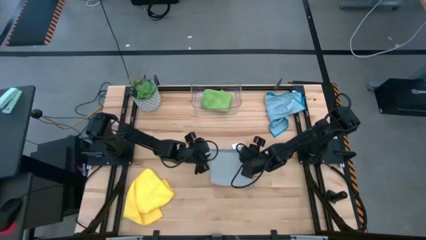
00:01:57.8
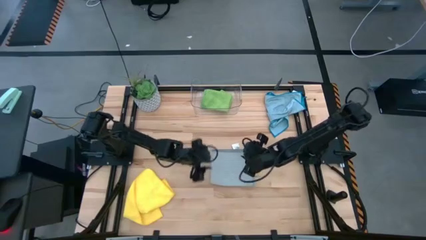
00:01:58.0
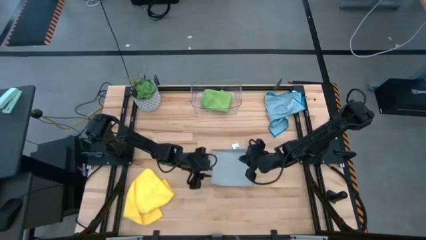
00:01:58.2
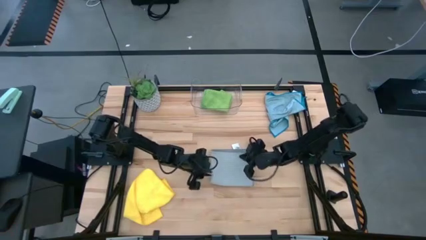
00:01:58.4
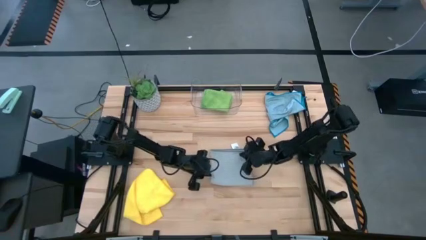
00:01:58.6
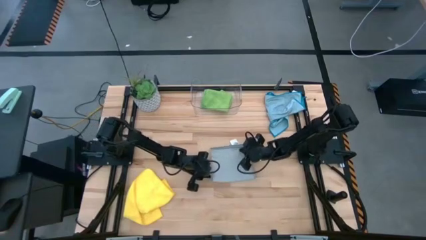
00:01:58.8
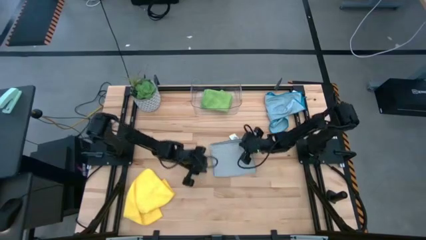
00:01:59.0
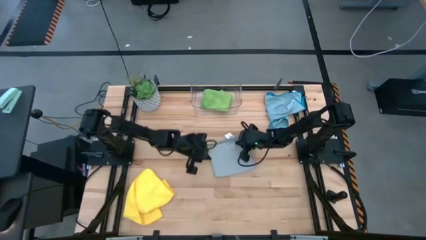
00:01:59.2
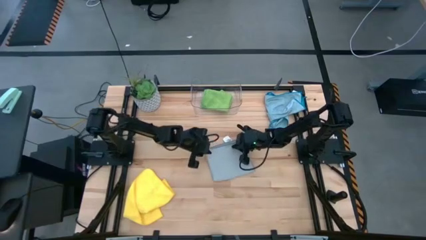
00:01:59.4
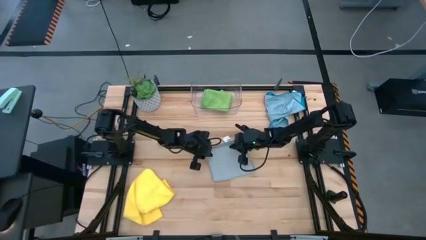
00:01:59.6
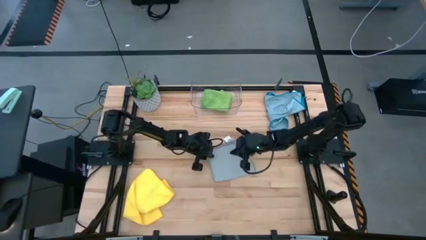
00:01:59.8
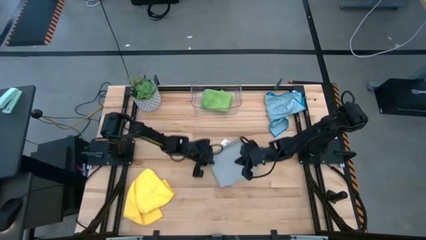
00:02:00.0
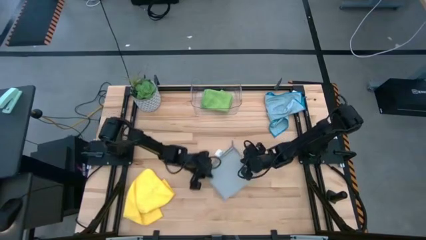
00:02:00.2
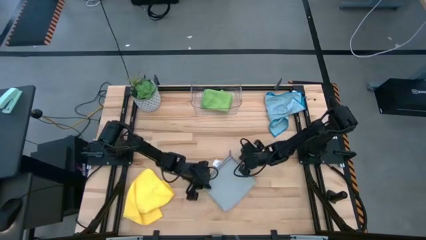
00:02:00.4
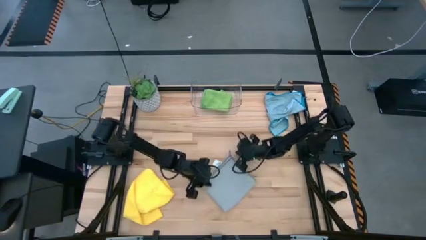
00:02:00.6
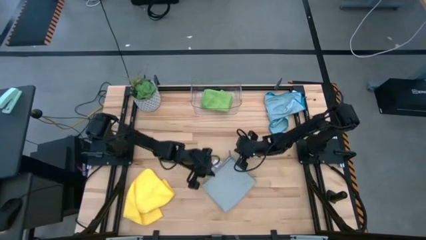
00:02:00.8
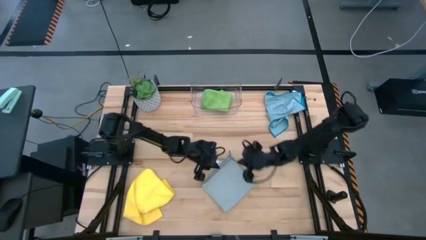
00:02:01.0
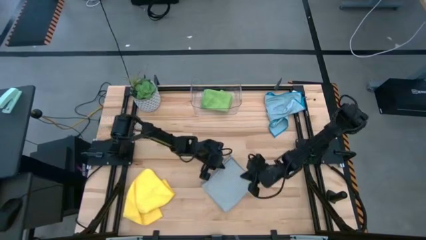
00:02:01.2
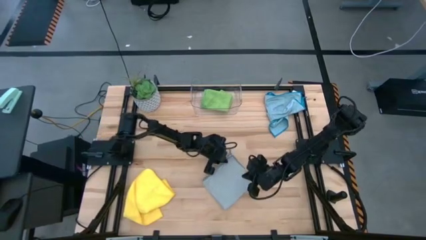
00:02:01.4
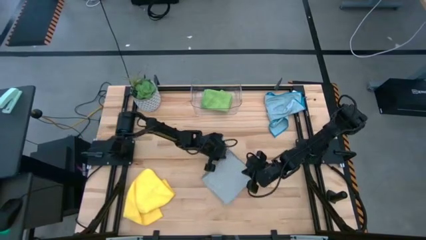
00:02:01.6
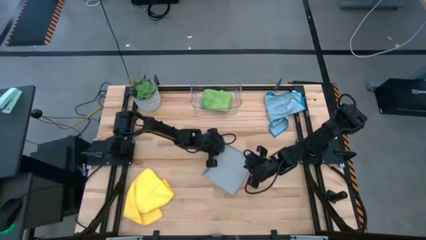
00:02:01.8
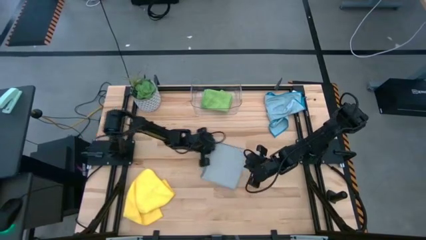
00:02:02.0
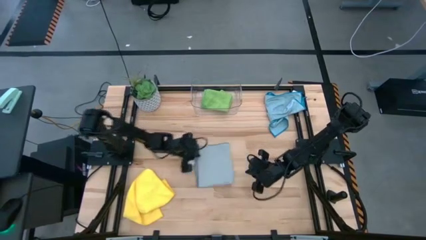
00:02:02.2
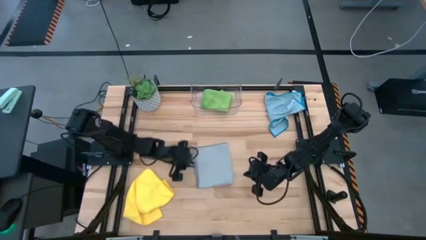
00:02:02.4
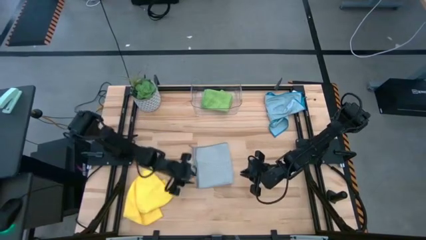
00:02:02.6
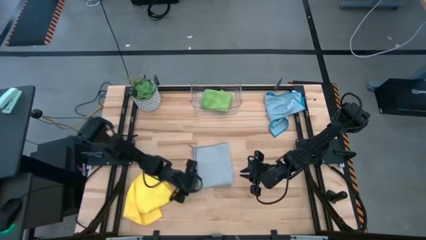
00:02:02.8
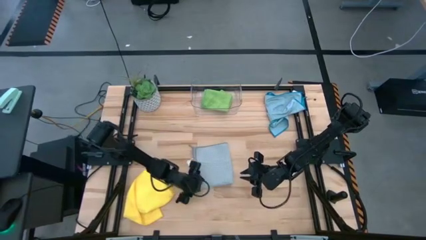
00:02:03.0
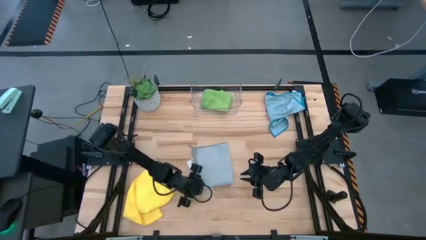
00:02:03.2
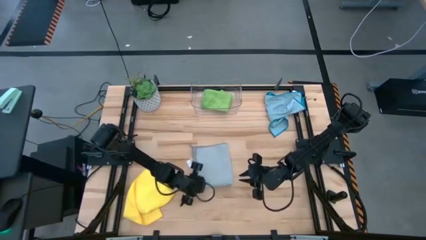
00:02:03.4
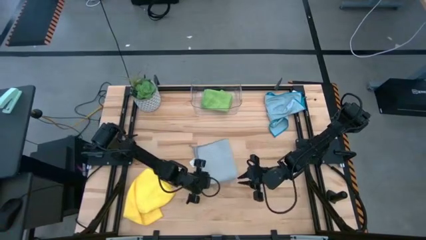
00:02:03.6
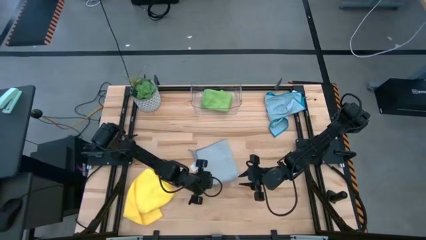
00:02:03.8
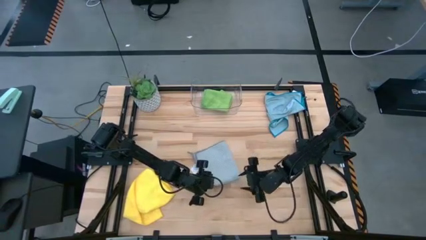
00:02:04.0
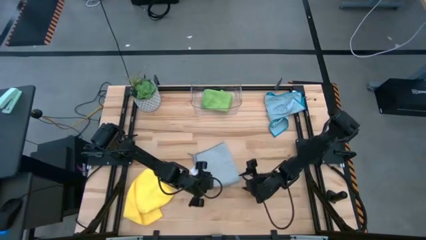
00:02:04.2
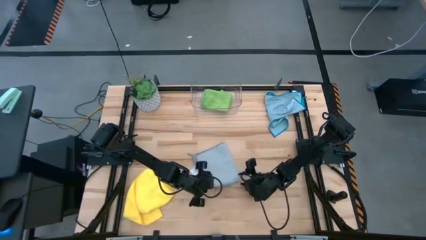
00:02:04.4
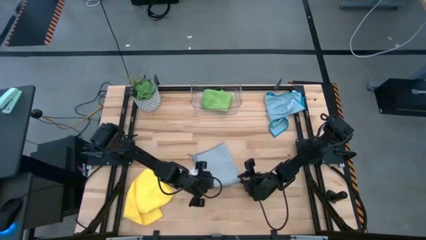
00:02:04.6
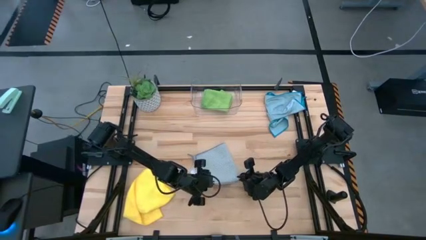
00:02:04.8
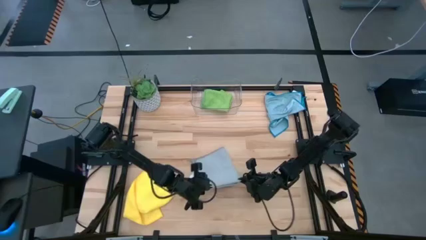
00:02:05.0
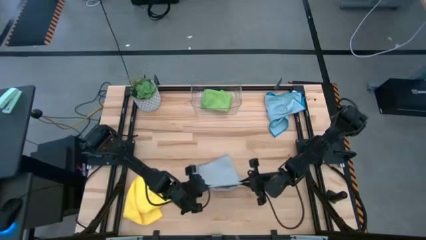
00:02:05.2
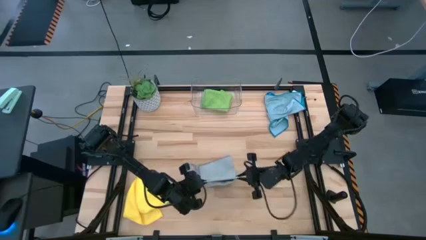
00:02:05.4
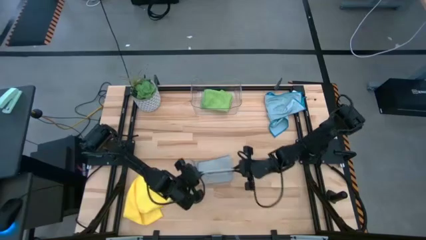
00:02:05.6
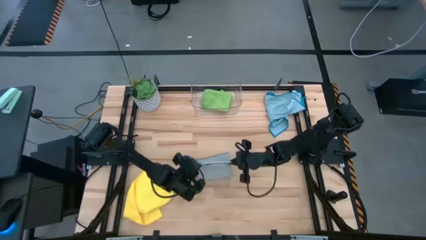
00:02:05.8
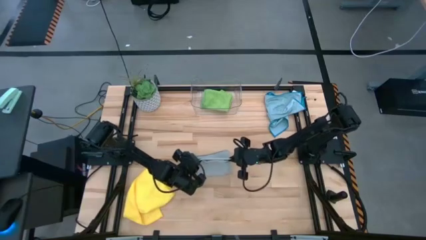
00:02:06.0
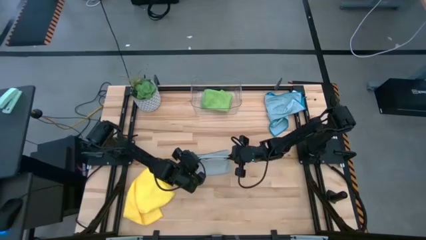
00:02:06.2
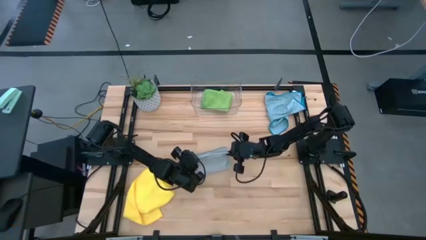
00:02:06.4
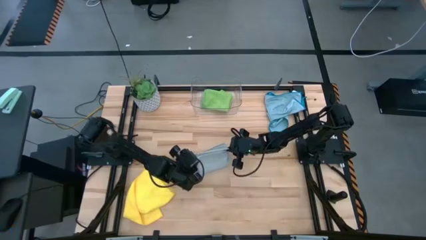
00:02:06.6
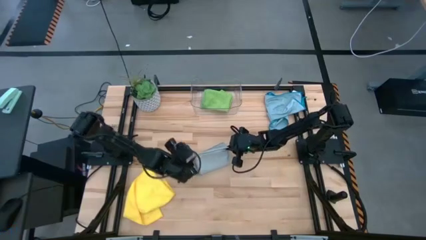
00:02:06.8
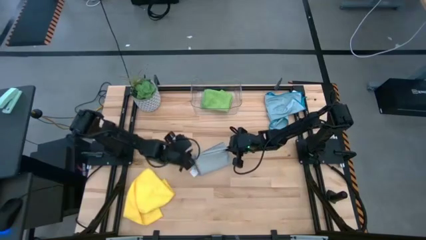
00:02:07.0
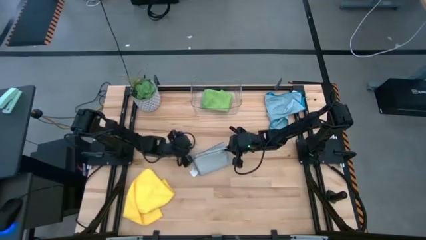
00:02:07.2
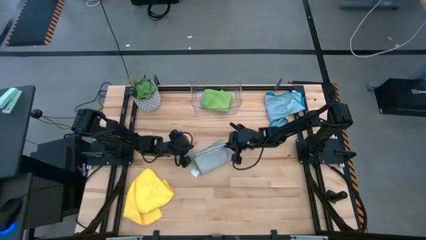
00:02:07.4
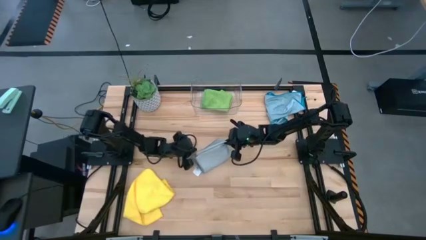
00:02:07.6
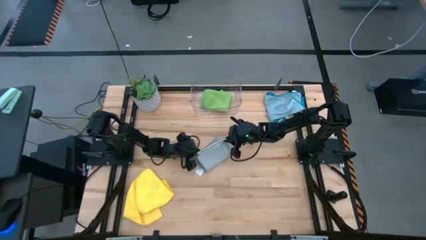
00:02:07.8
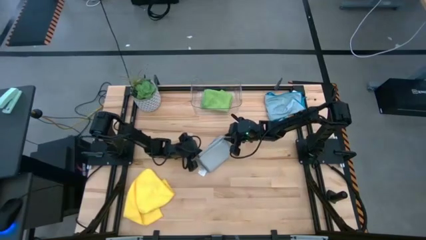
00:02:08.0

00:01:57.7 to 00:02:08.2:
Task: Fold microfiber towels
Fold the gray microfiber cloth

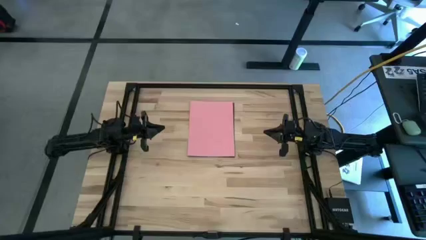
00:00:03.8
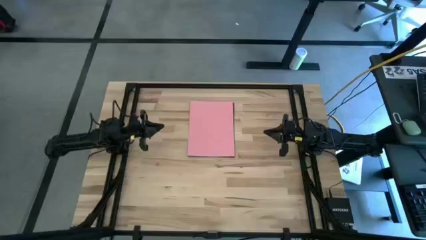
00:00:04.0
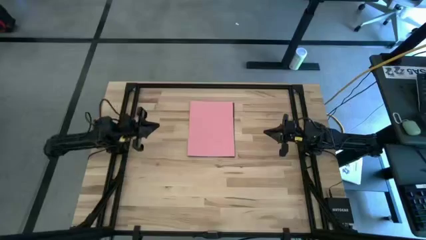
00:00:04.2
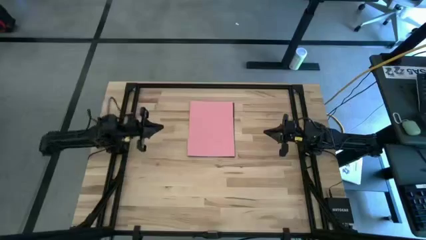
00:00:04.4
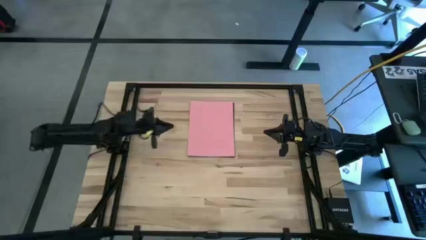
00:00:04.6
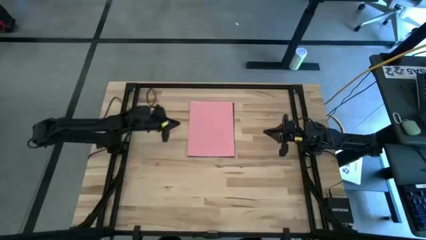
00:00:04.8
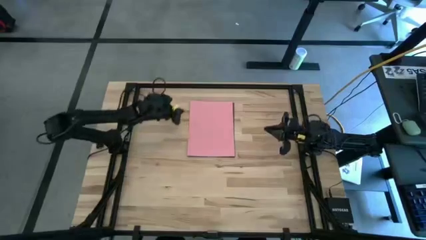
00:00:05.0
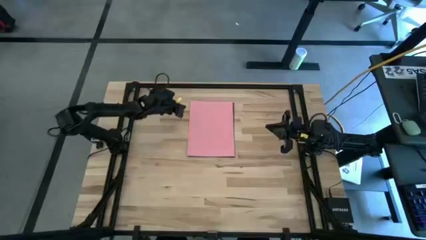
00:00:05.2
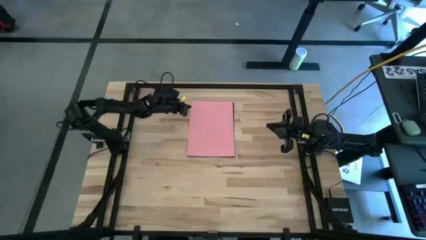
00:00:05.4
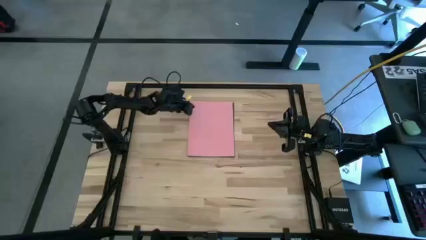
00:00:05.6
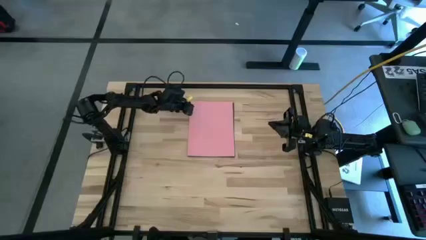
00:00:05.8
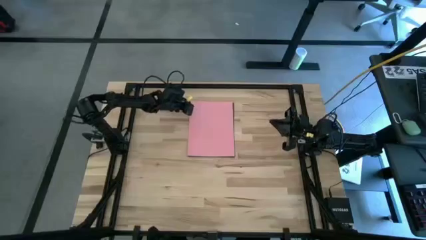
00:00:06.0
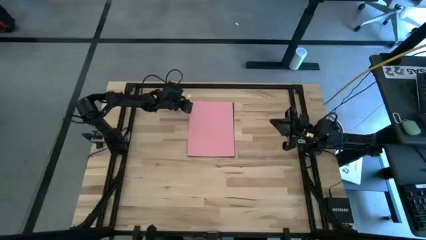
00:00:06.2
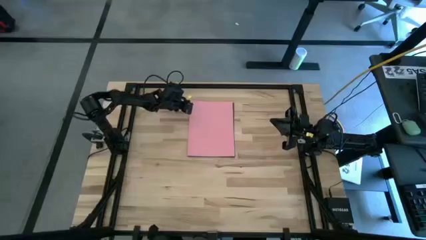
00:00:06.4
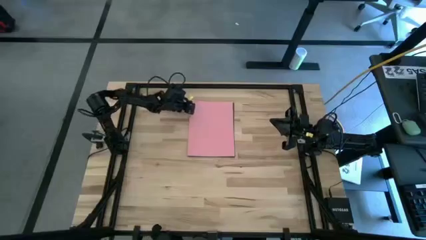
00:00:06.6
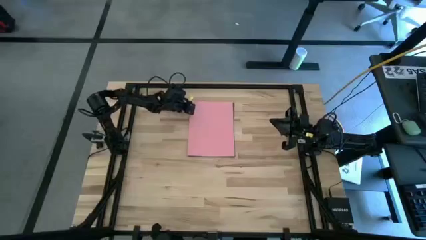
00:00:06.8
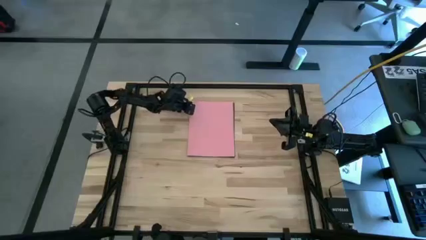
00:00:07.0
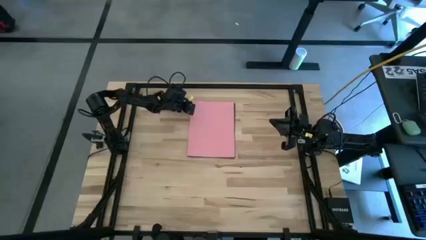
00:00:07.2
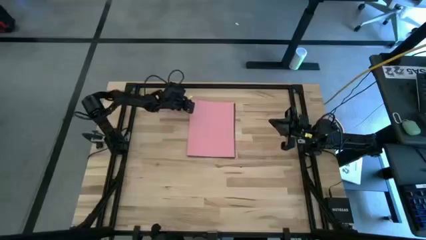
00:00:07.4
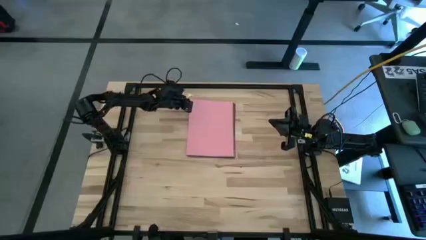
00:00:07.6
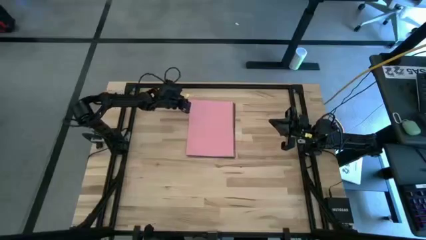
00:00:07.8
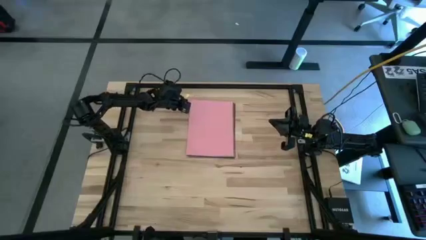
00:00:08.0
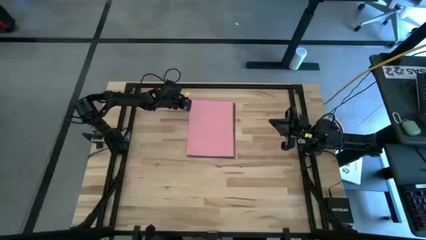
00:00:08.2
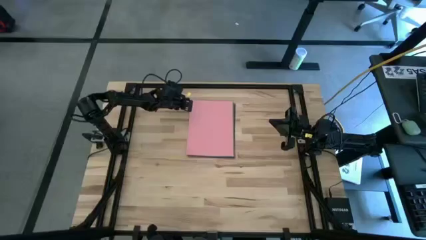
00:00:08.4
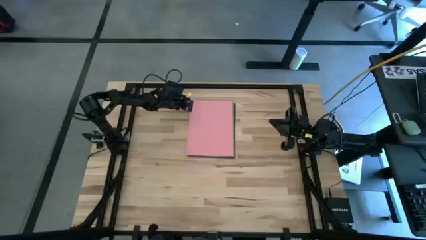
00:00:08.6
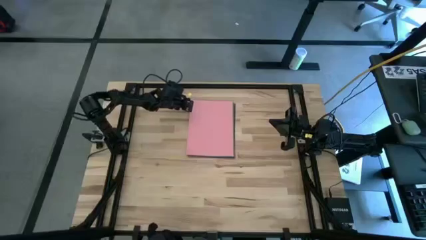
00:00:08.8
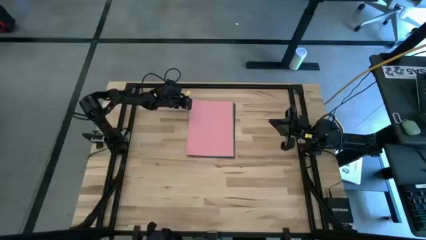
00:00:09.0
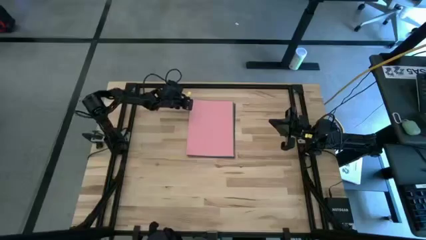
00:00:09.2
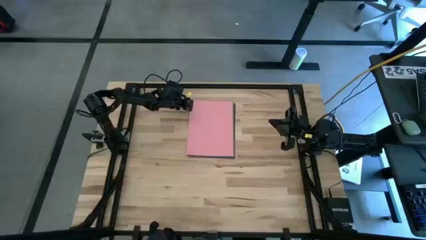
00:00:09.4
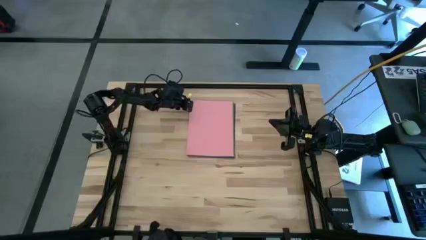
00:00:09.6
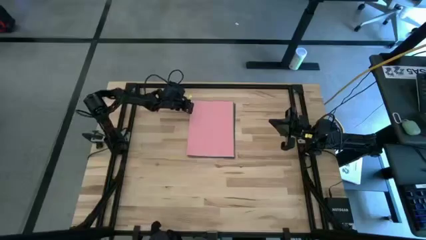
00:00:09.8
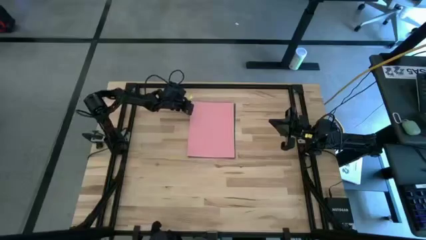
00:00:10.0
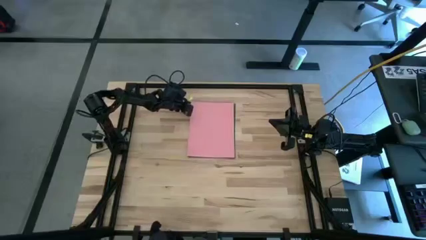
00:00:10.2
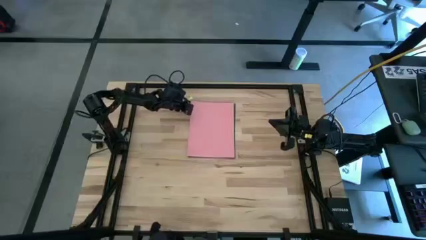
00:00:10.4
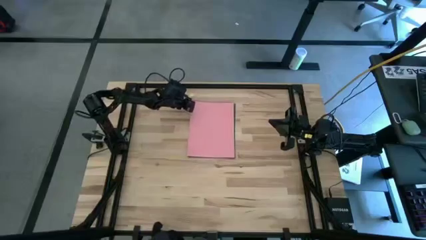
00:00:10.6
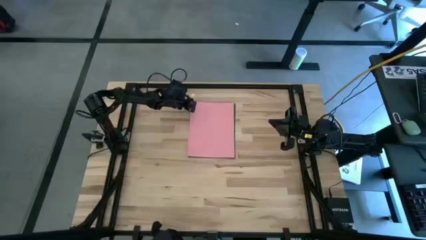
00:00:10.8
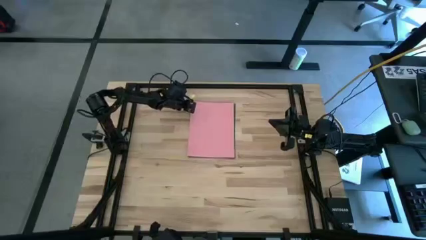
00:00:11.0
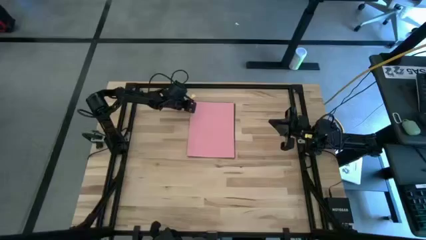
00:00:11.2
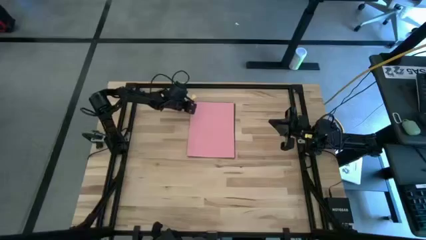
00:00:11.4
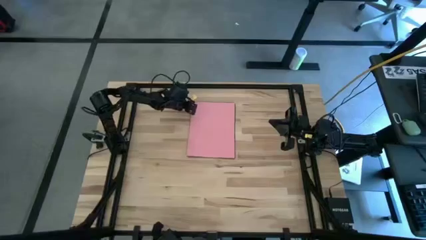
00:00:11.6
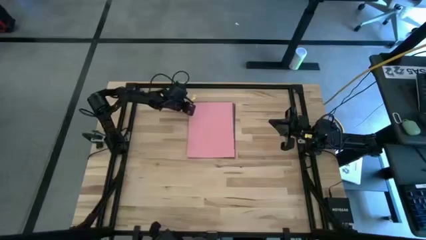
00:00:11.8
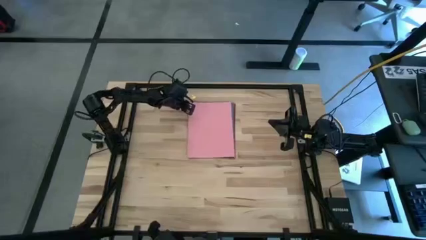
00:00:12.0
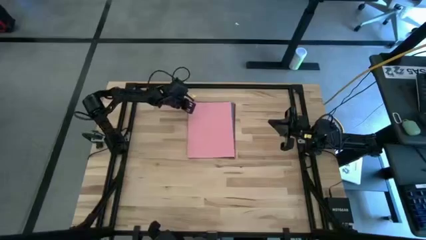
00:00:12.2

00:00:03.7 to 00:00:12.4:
Task: Organize paper
Move the pink paper to the top left of the table
